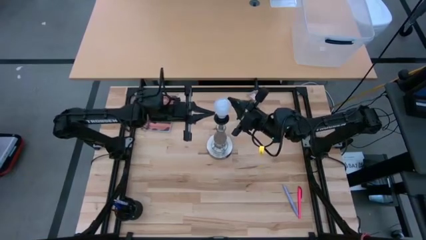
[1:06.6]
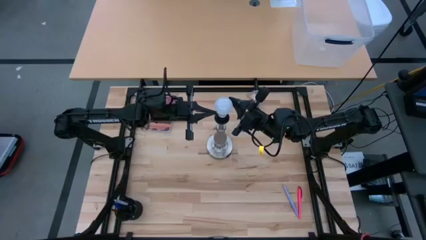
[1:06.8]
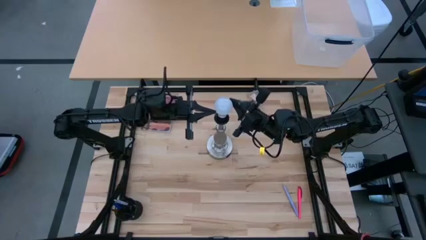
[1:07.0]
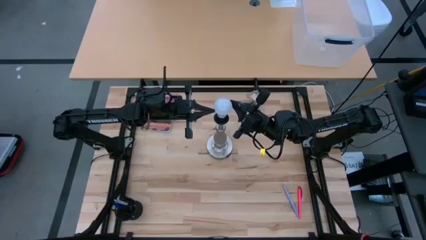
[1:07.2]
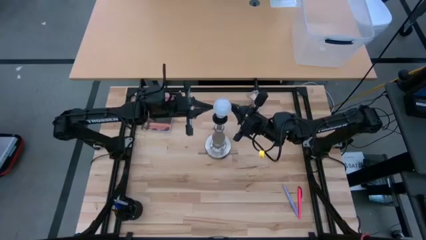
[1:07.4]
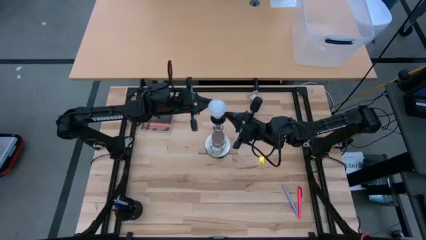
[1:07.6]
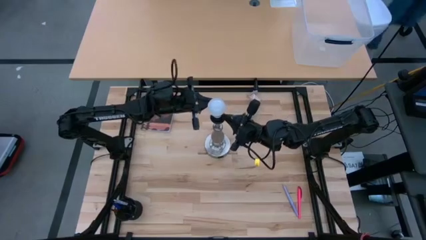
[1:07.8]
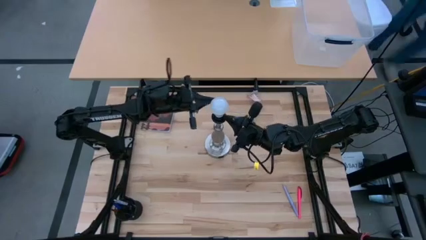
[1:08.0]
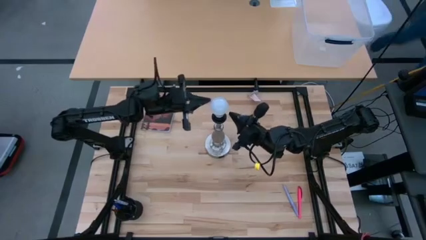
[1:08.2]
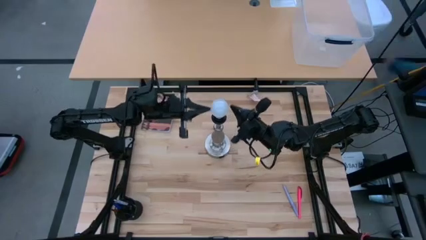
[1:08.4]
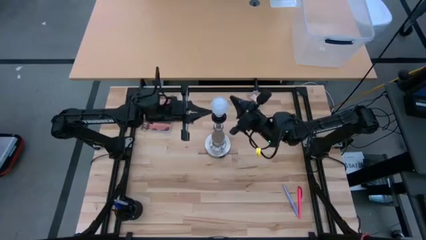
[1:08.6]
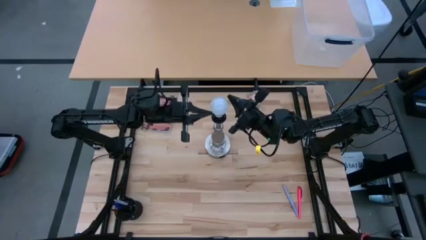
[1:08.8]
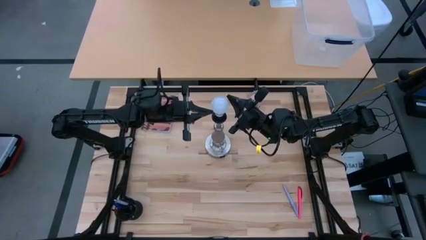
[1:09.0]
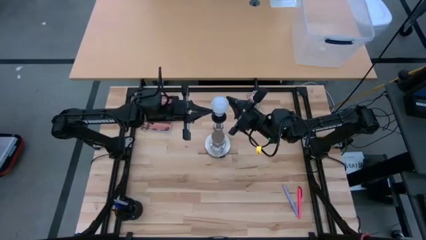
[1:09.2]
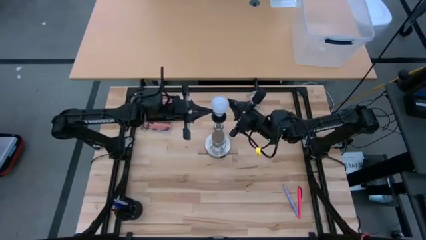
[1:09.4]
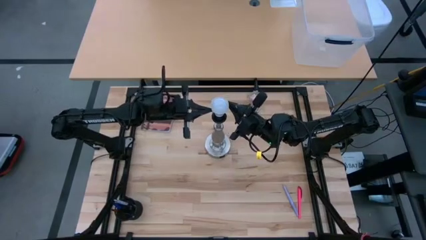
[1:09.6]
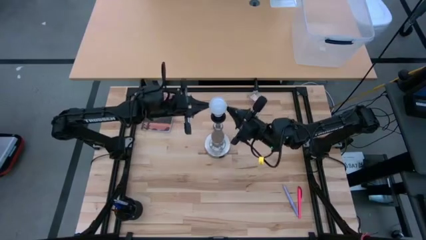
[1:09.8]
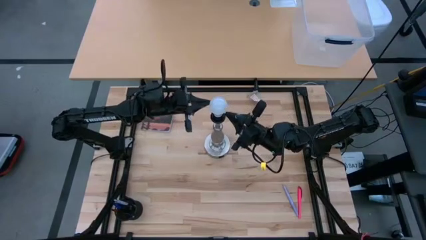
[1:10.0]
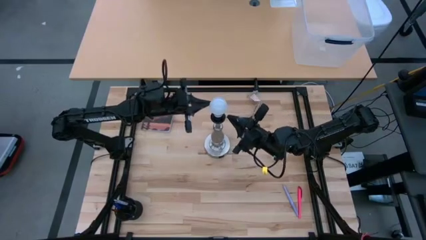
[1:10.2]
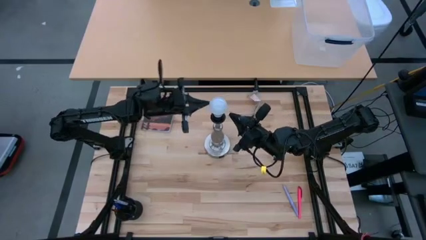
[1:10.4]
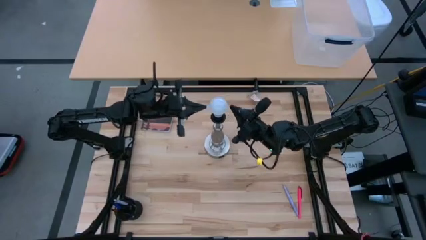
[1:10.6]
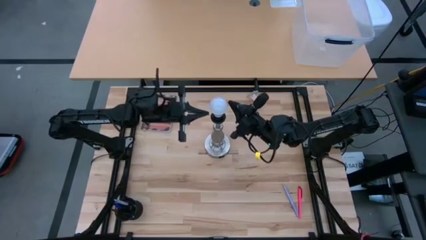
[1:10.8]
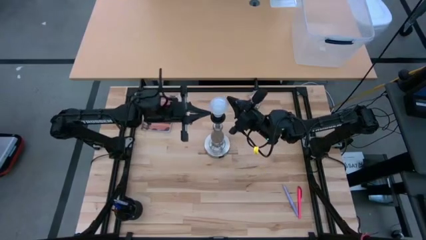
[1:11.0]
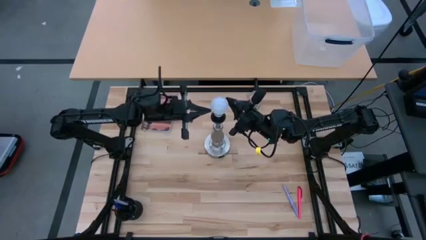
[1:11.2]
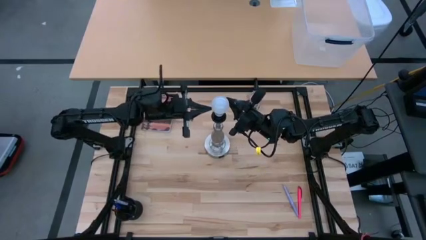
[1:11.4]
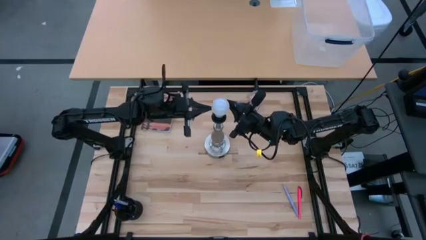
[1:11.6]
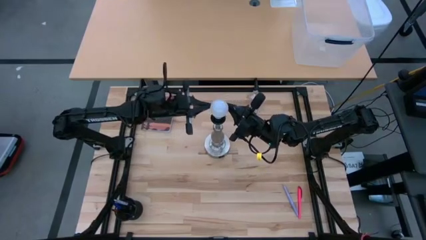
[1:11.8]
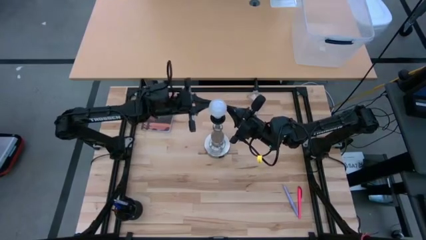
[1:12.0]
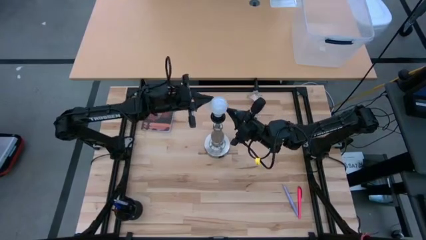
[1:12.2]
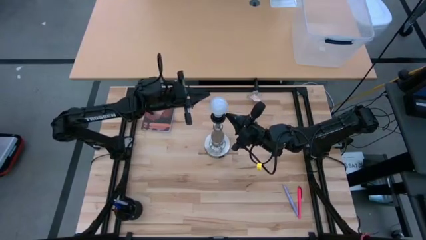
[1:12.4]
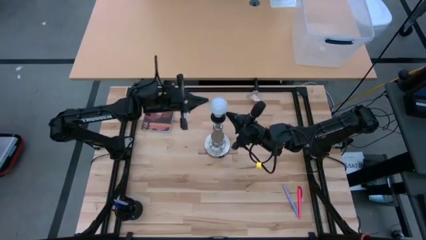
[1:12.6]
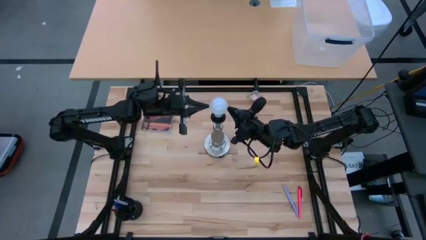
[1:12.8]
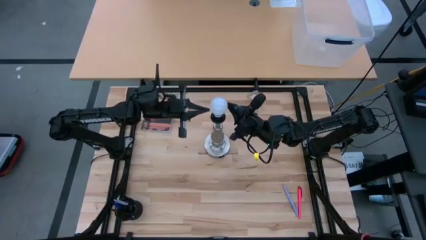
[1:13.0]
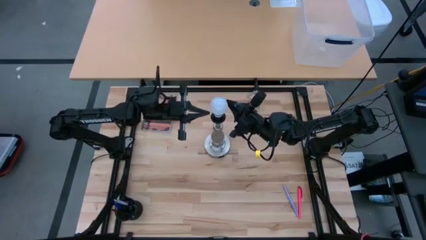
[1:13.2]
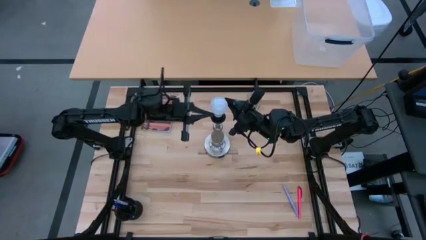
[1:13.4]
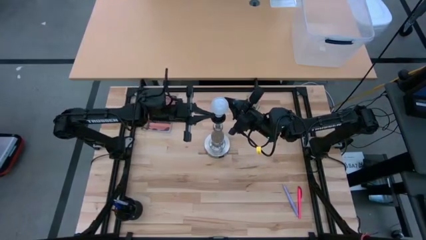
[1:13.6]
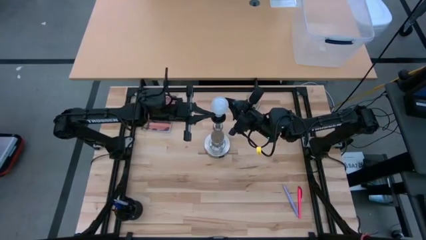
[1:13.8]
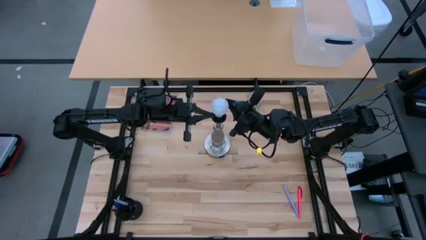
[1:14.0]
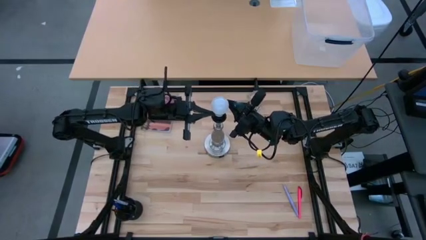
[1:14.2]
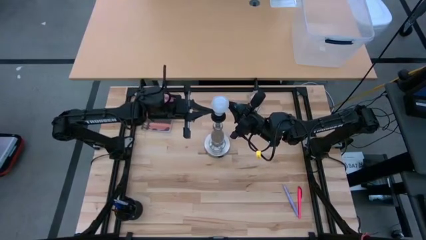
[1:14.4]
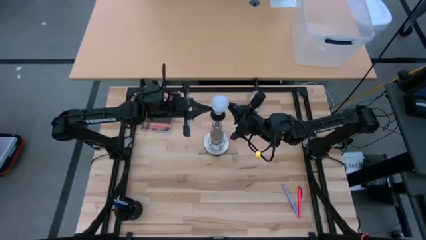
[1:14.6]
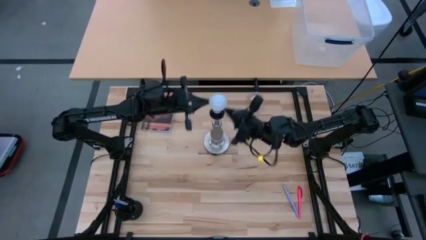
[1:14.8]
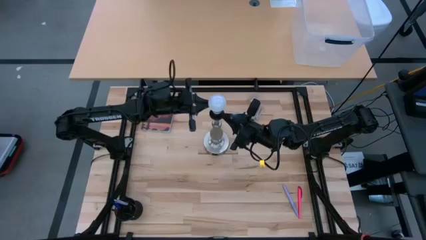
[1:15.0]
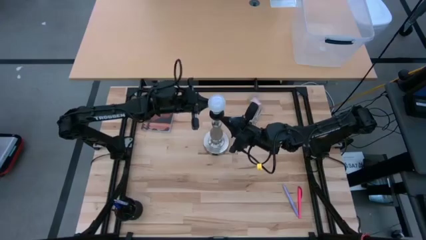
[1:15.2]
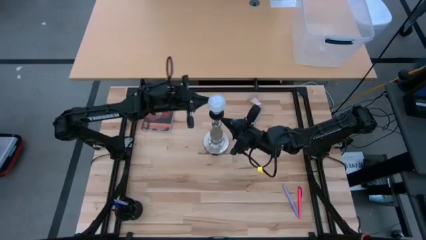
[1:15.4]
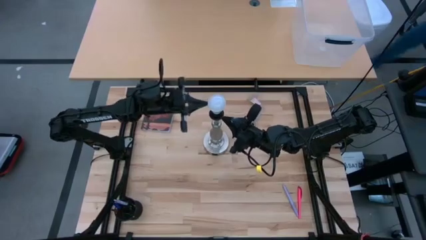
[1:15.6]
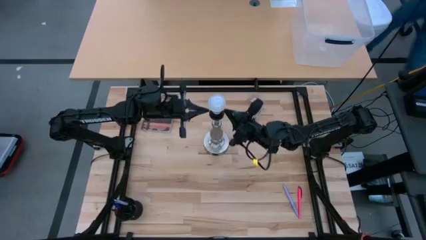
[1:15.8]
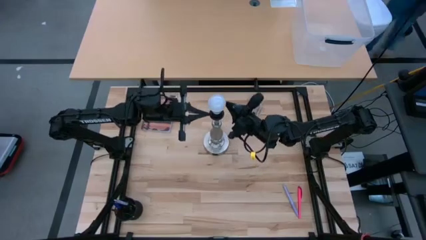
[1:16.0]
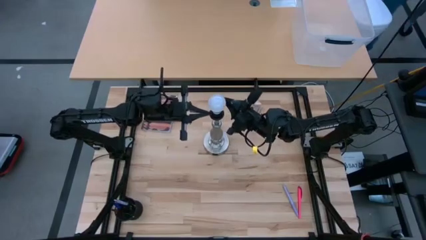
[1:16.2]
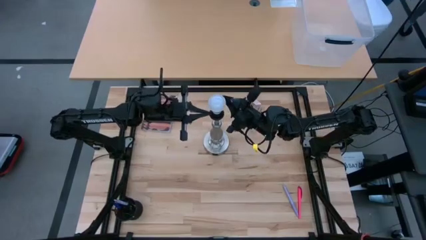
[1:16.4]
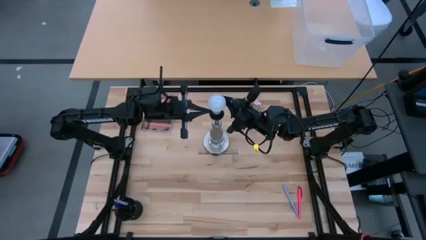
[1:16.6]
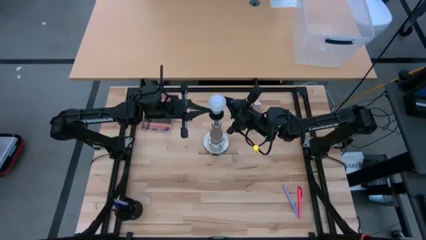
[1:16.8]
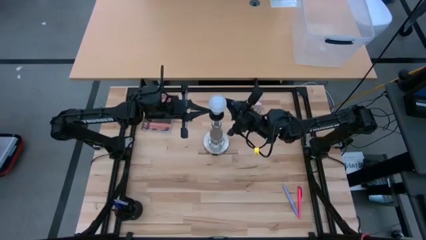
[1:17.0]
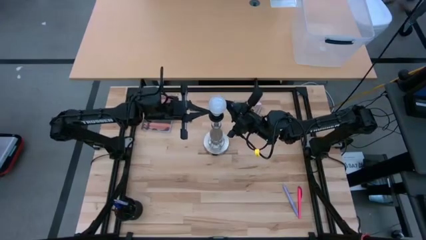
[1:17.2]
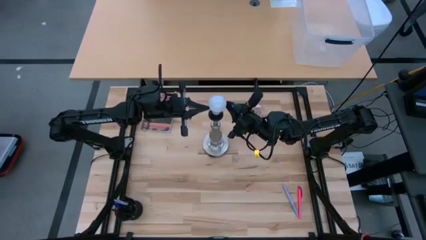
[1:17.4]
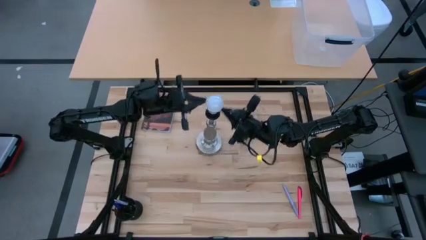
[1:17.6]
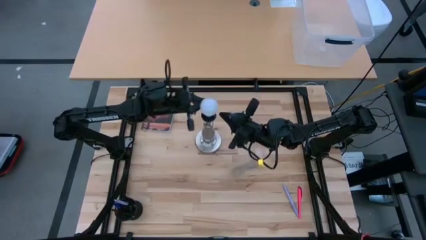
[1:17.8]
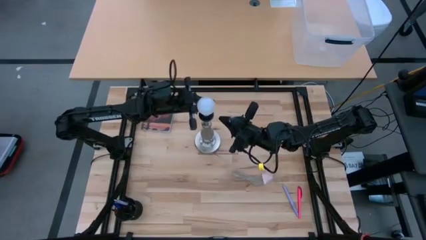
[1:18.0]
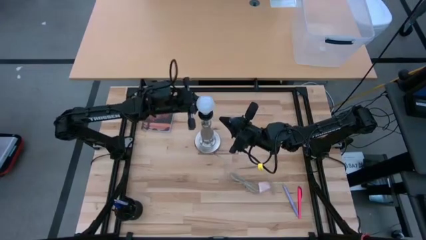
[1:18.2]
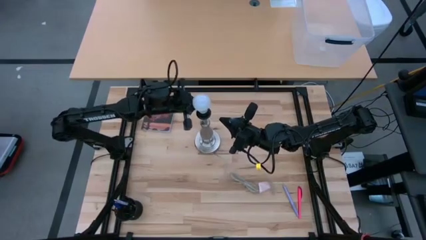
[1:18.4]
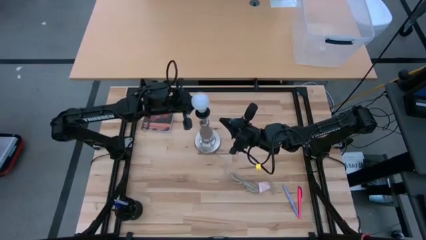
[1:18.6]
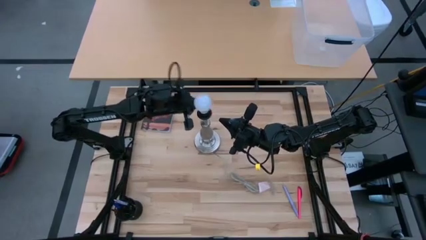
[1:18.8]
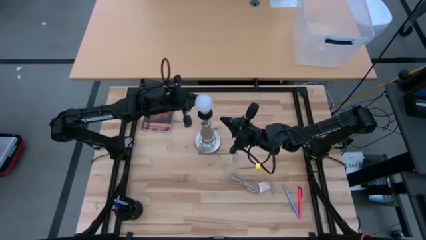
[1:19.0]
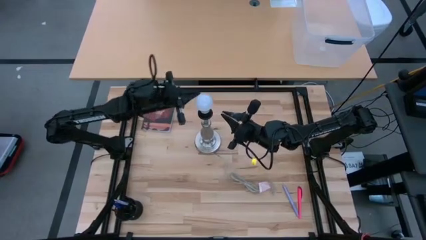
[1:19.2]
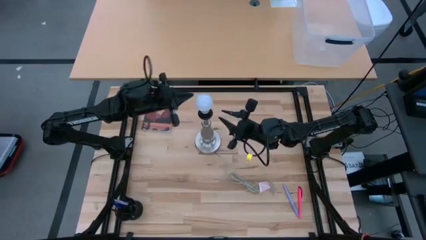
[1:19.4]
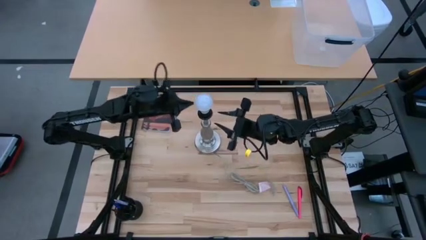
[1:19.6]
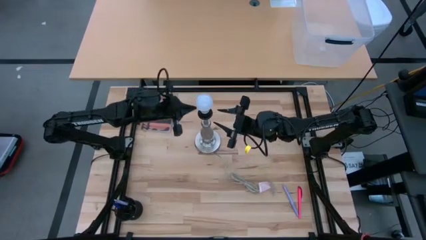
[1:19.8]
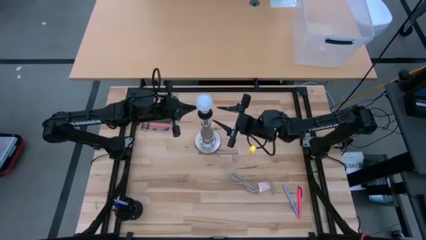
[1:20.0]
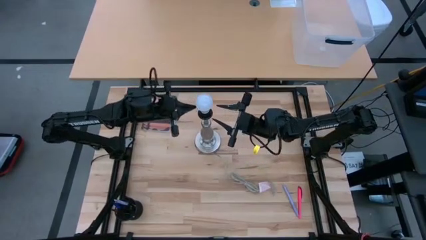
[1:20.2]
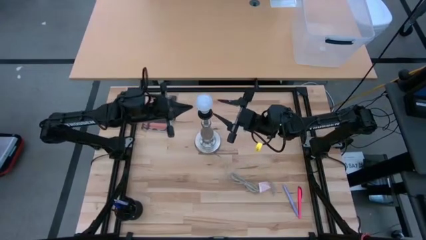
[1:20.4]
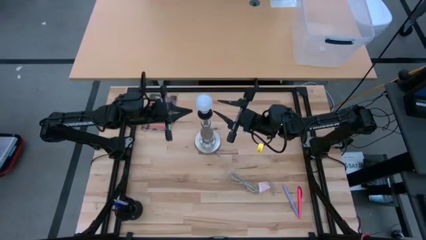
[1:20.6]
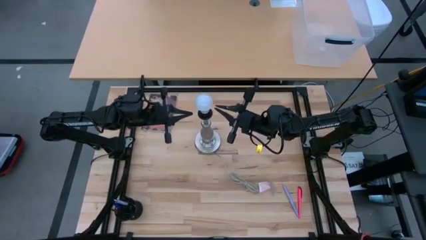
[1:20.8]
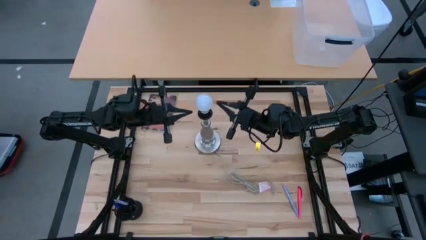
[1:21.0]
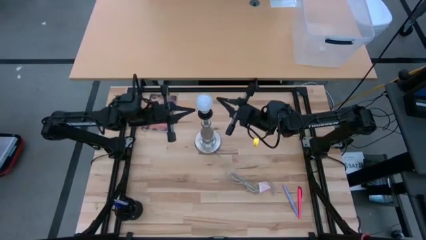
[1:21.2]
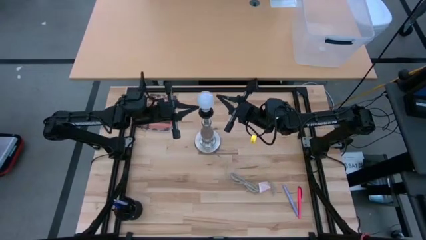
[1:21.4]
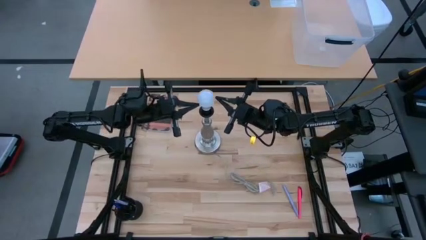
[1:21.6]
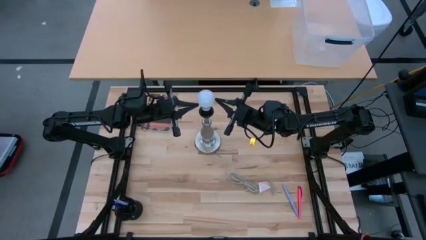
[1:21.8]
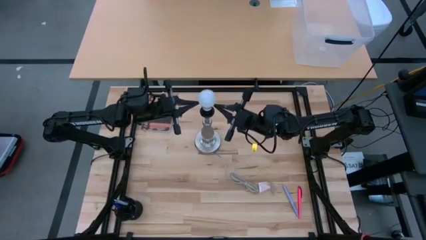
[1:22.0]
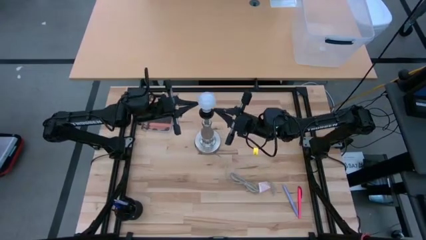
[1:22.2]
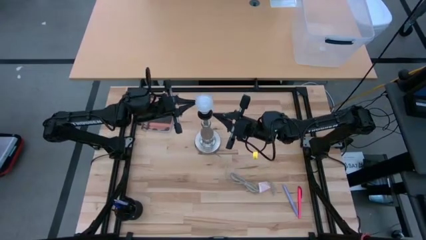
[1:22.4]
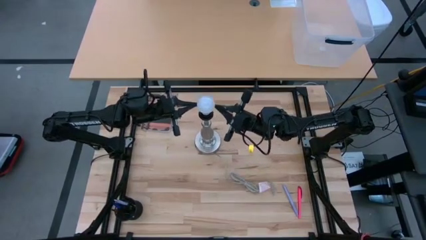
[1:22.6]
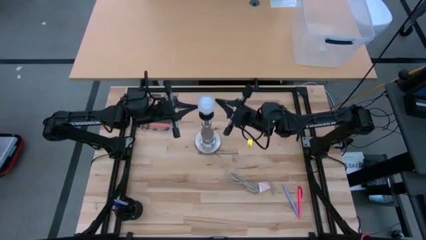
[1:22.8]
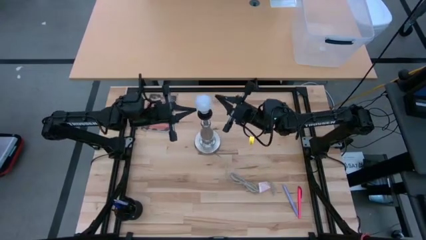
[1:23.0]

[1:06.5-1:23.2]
Task: Screw lightbulb
Insert the lightbulb into the silver lamp
